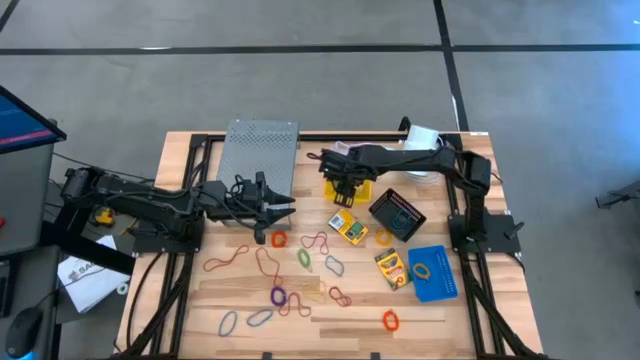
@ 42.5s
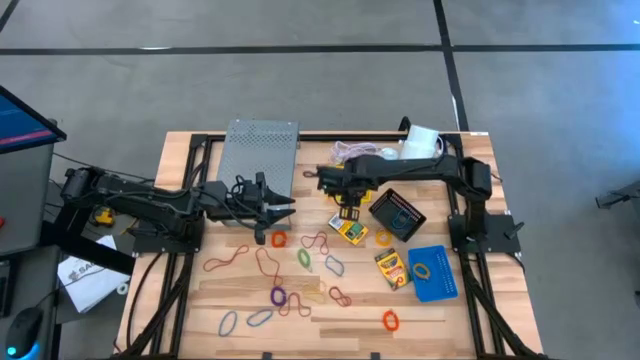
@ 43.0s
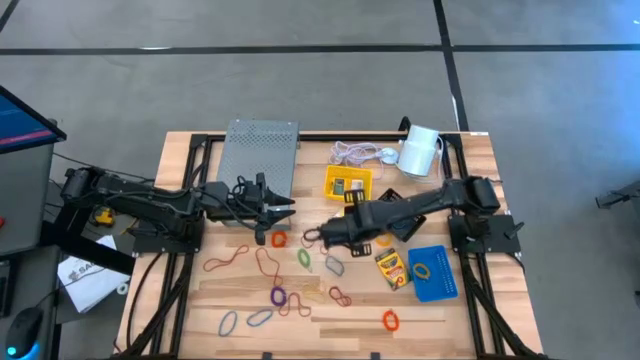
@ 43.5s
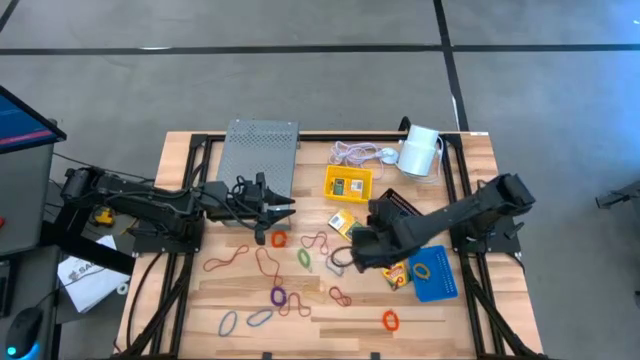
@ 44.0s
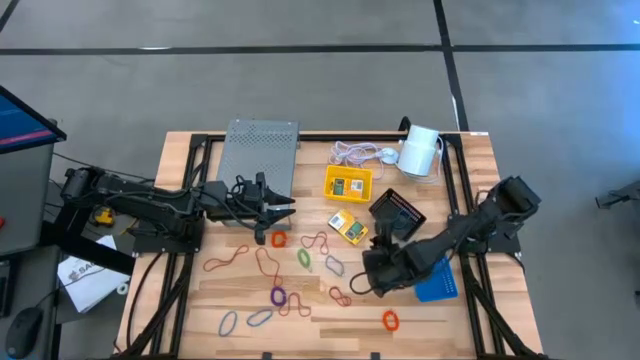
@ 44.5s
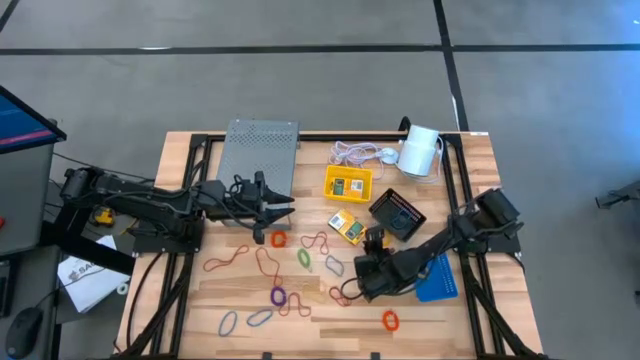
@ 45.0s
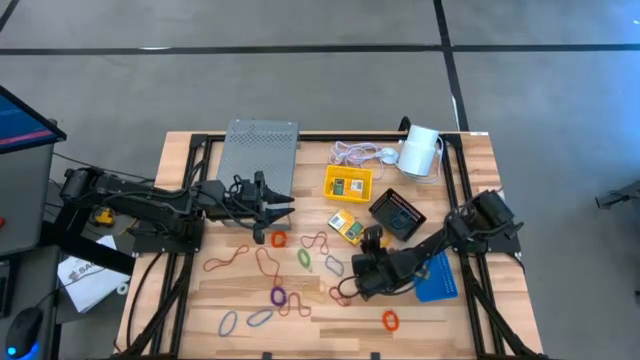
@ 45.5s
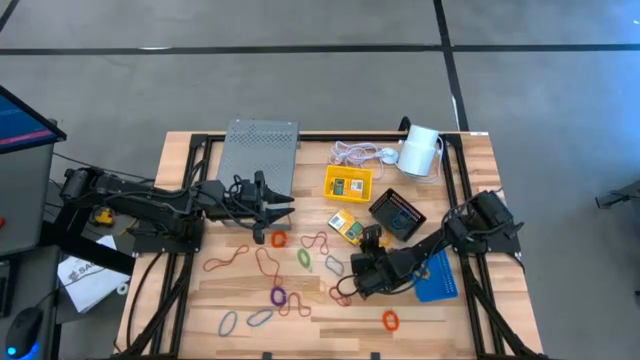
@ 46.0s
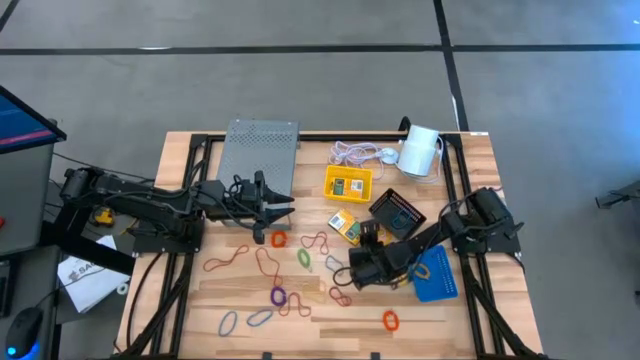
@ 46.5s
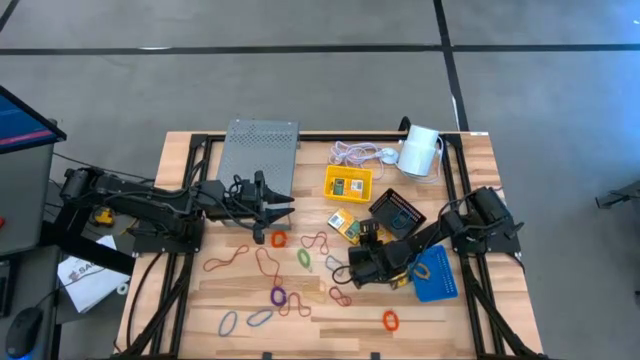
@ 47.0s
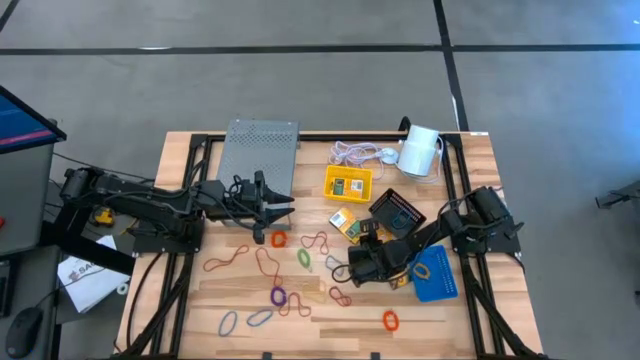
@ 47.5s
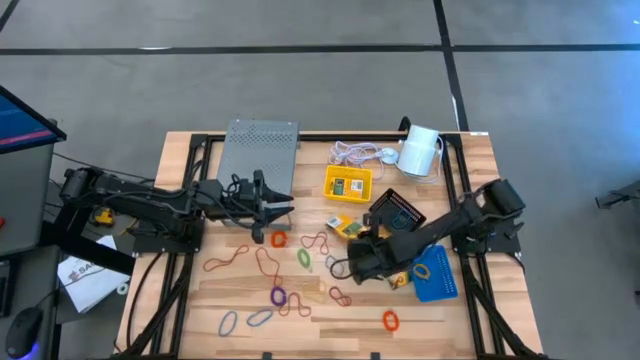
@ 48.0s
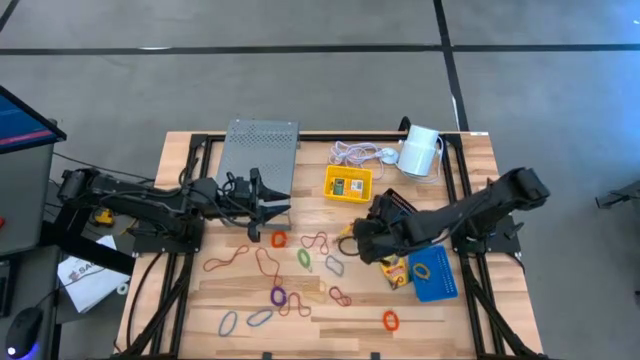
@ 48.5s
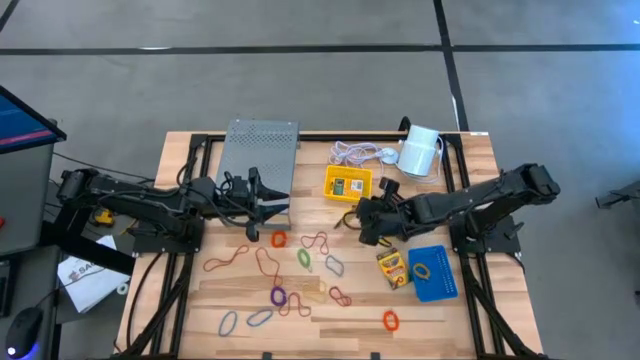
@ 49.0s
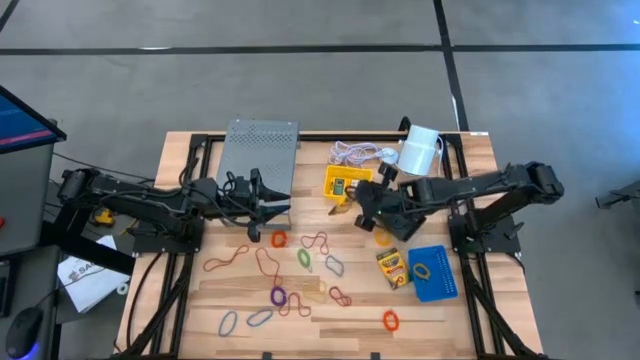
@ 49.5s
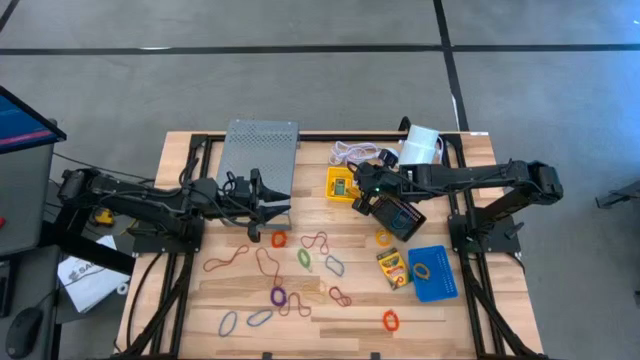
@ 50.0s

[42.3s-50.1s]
Task: Pick & Place Office Desk Supplies
Put the crayon box into the yellow bin

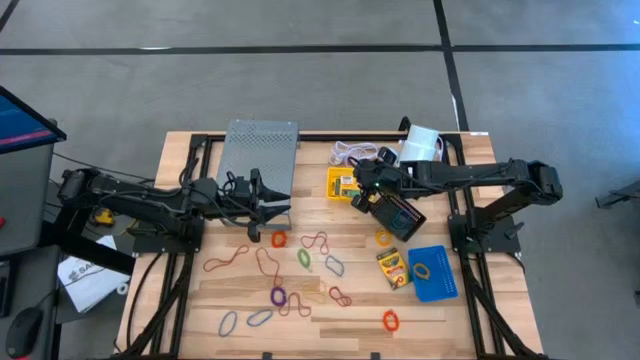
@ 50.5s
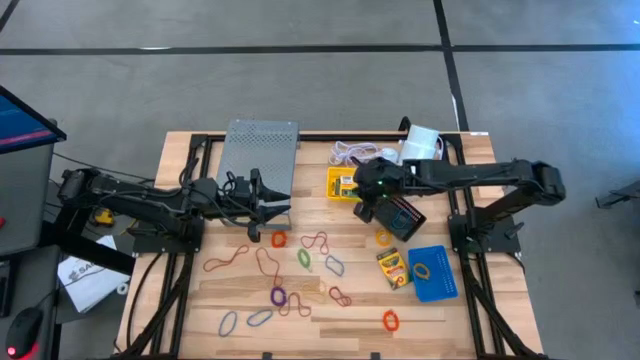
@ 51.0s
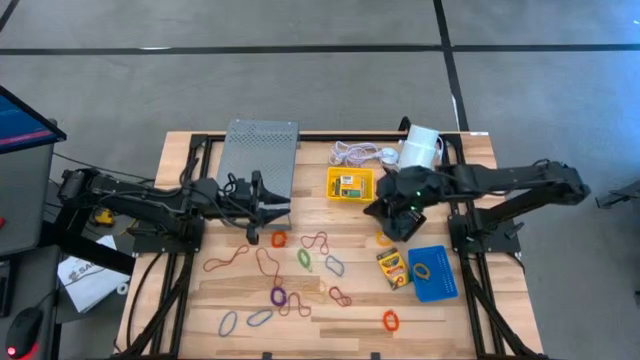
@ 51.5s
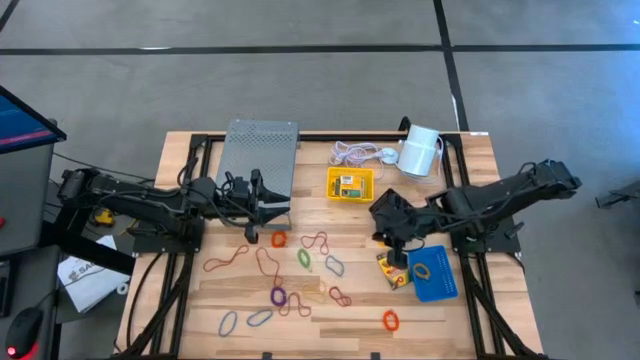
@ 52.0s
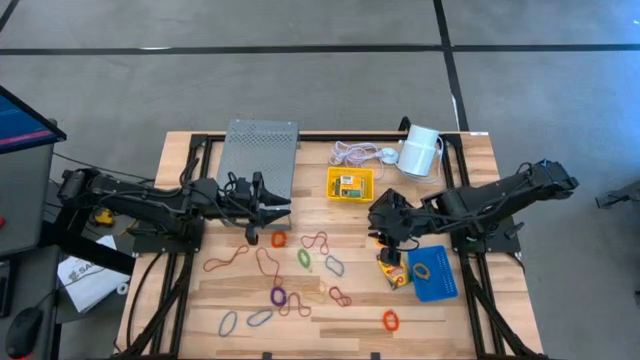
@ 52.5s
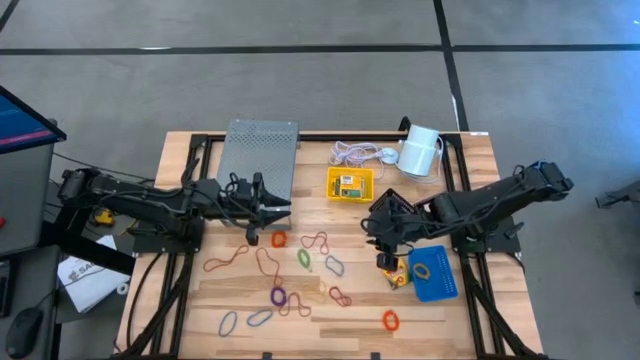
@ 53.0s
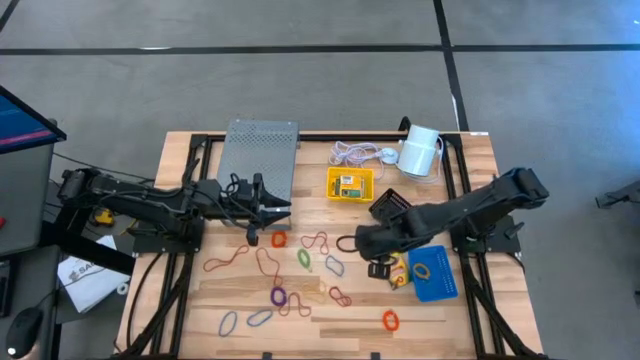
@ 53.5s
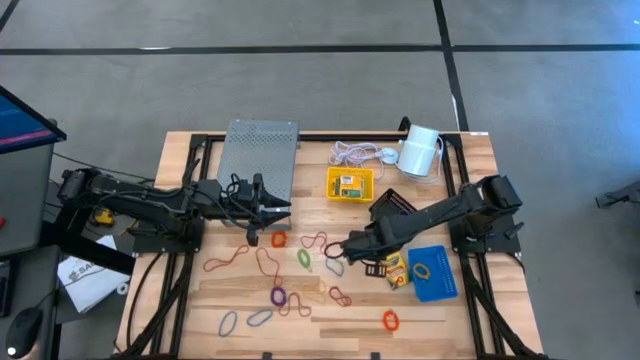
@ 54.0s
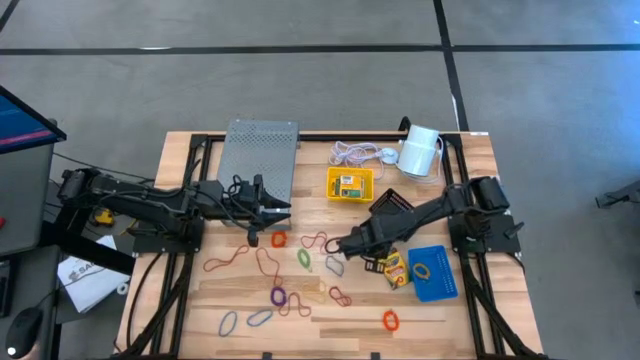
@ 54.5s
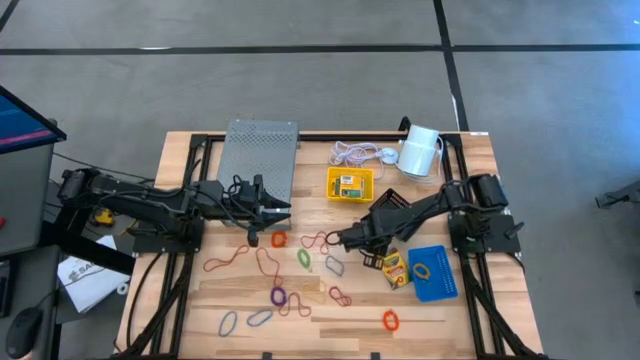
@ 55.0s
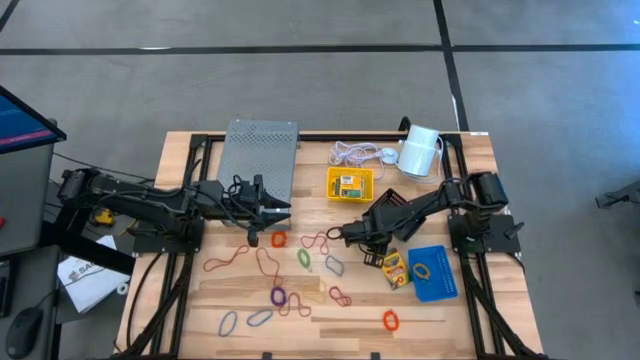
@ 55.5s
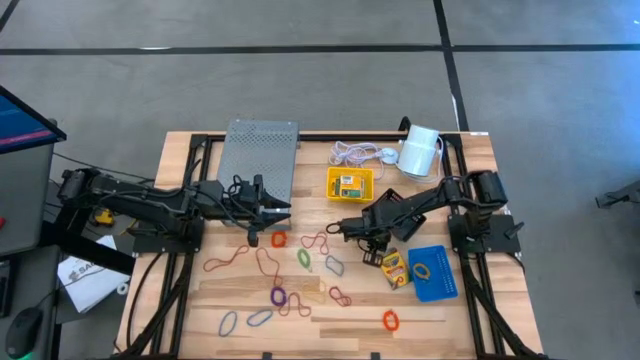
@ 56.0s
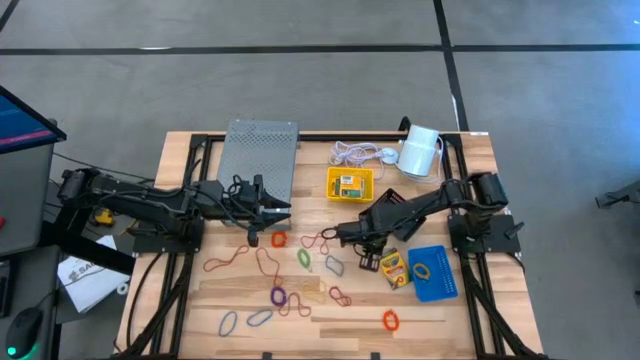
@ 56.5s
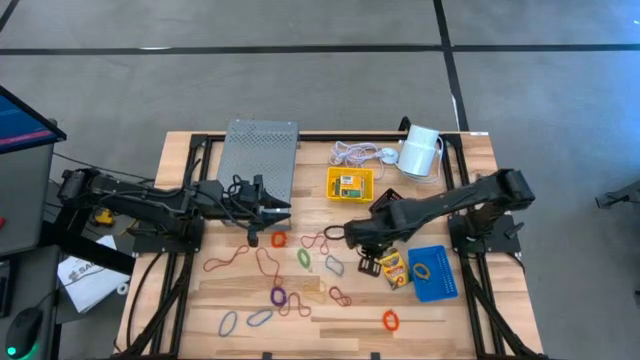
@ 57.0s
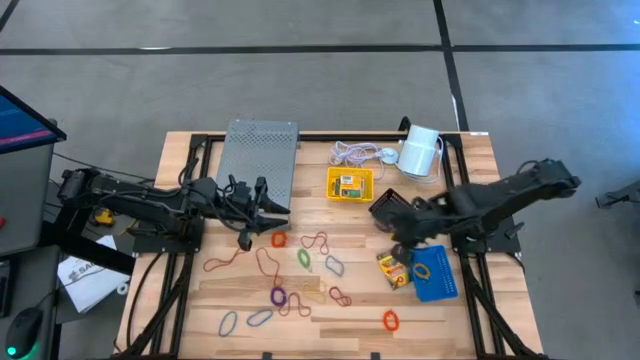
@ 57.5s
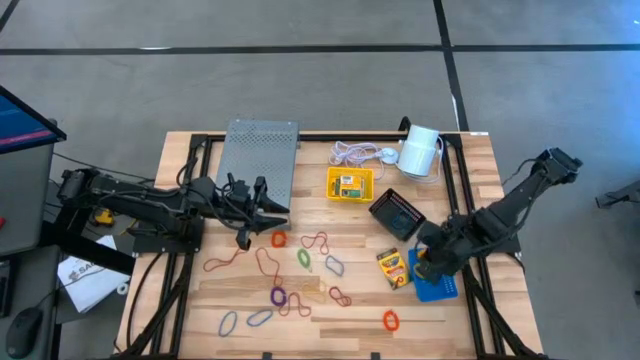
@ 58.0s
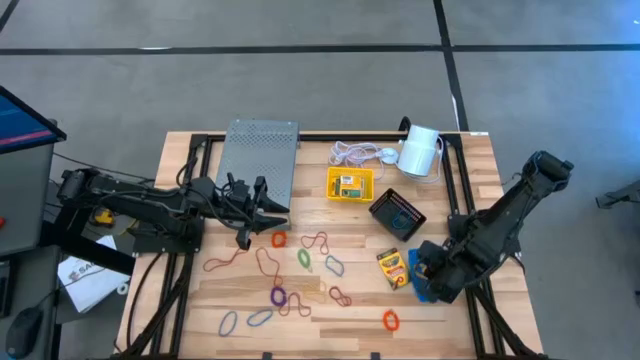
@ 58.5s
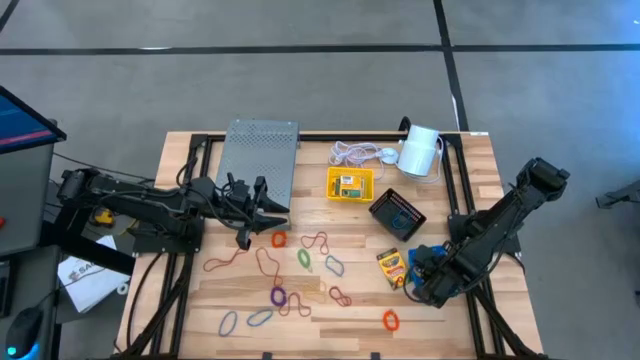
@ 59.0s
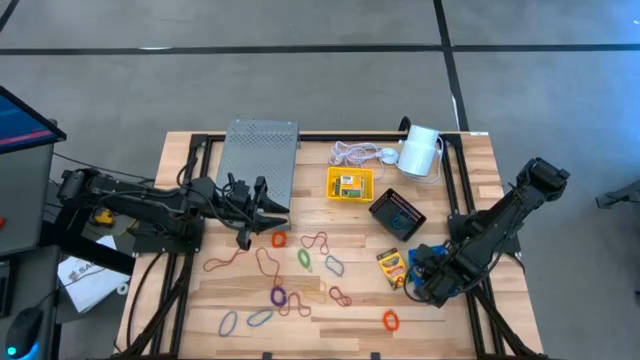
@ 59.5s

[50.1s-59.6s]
Put the yellow spring keychain into the blue bin

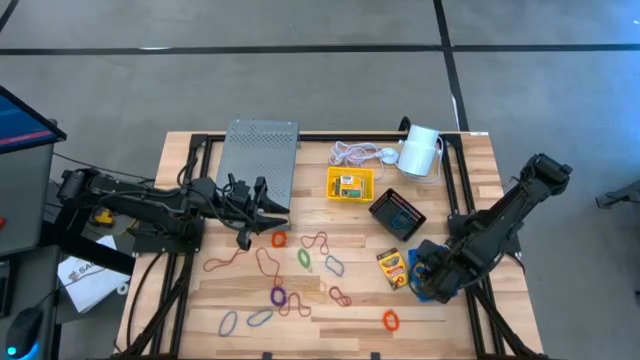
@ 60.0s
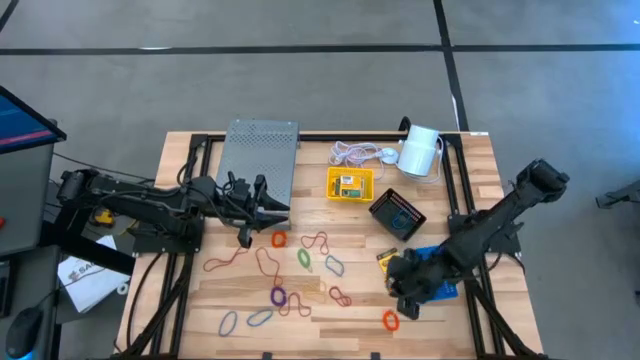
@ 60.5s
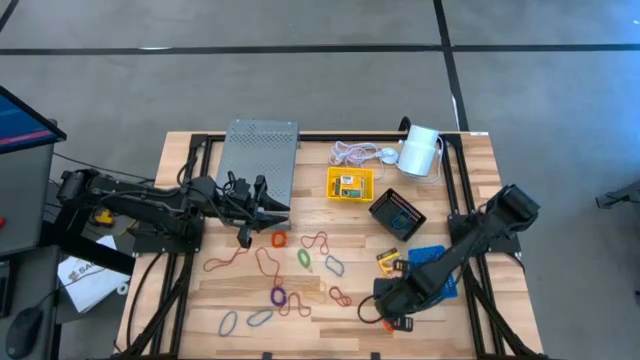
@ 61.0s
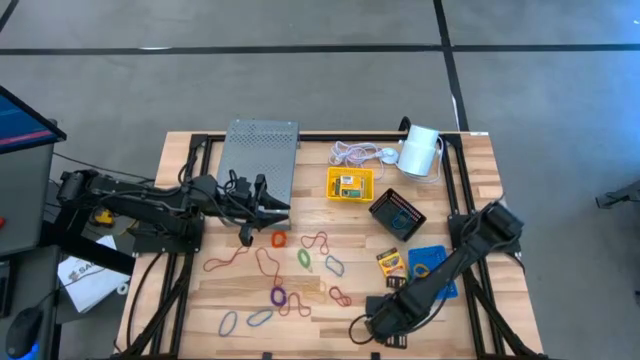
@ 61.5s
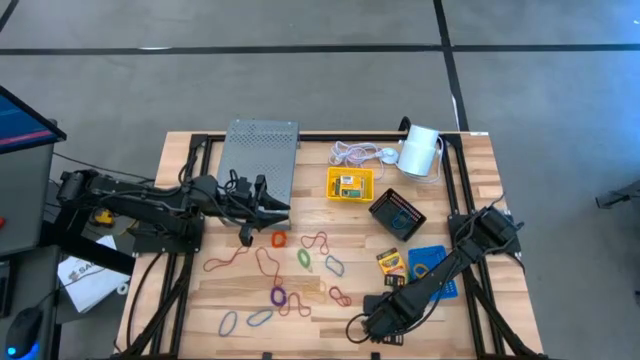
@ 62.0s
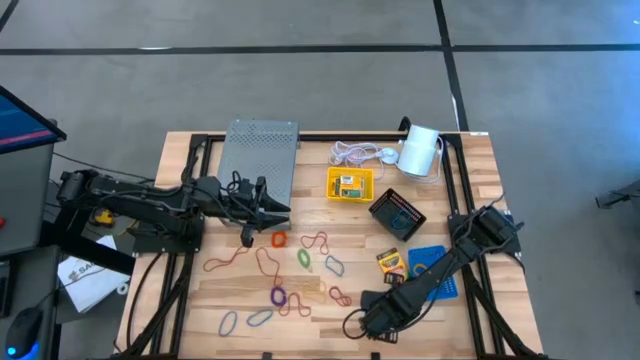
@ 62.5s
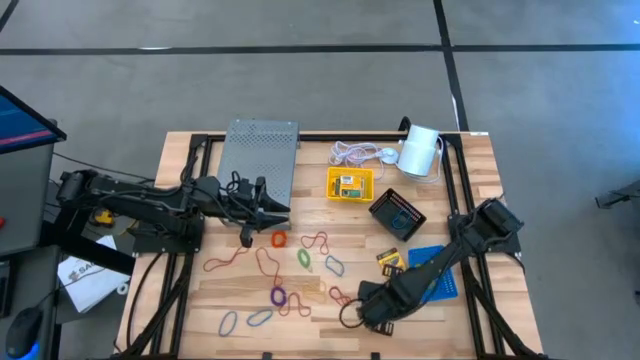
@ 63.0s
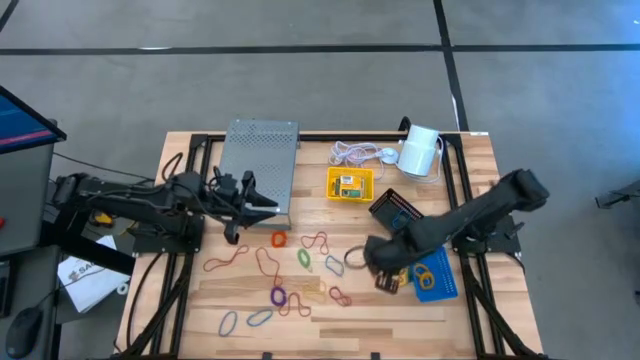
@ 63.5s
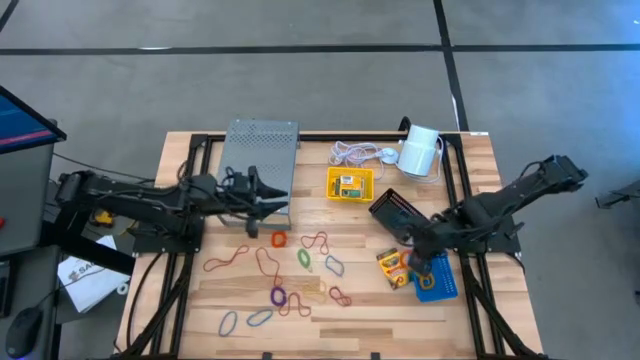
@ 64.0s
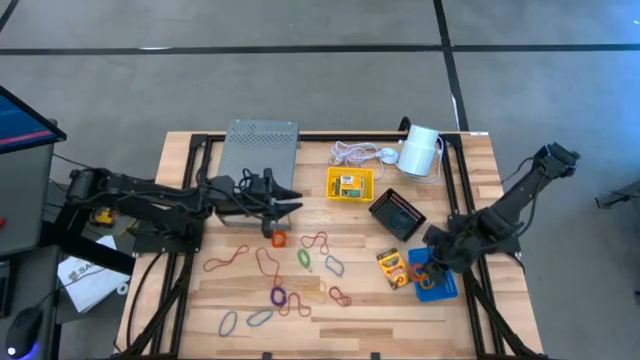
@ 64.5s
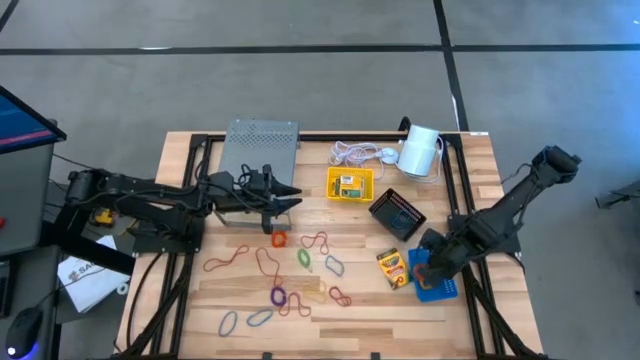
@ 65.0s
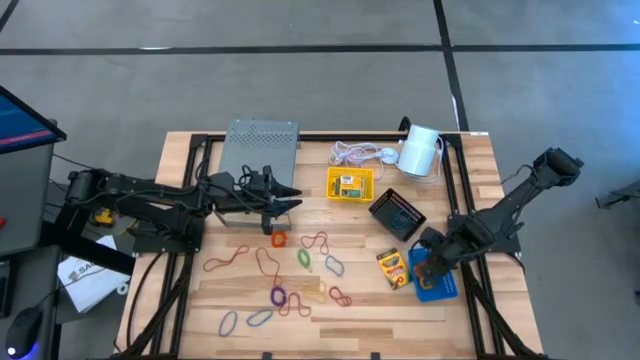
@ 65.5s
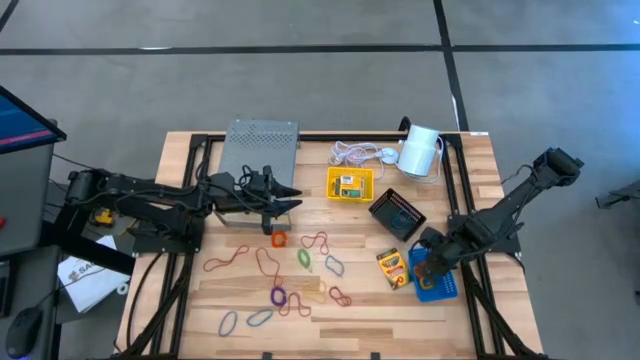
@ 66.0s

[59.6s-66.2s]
Put the orange spring keychain into the blue bin
